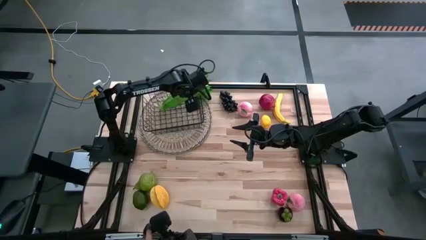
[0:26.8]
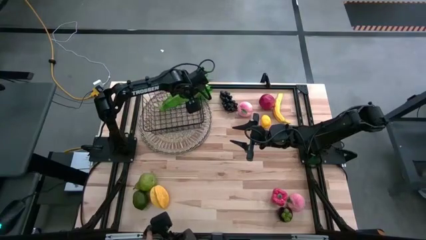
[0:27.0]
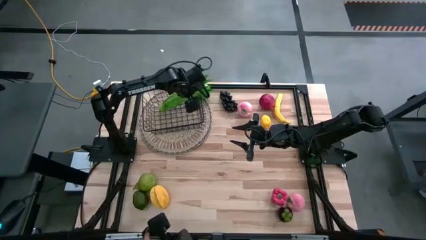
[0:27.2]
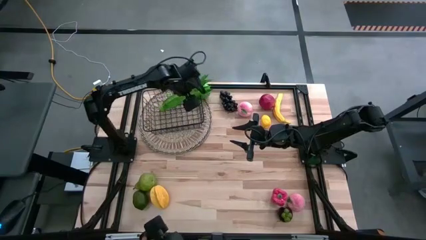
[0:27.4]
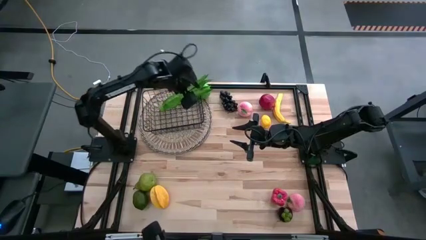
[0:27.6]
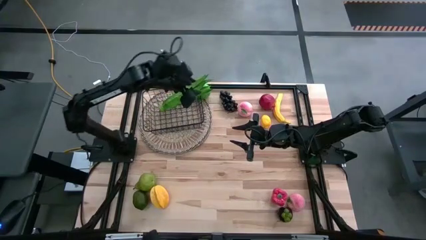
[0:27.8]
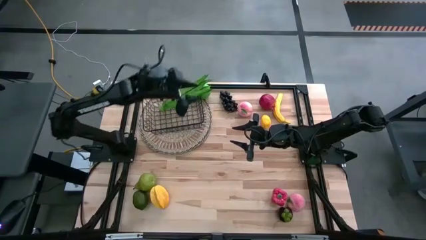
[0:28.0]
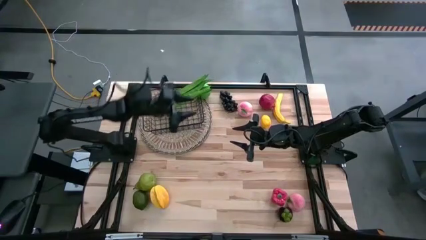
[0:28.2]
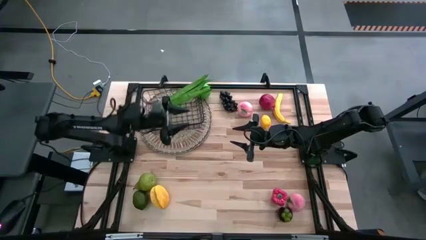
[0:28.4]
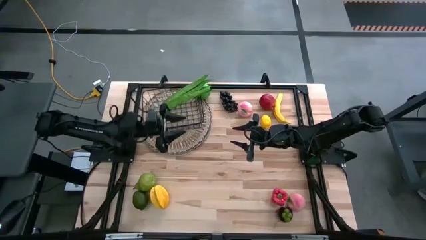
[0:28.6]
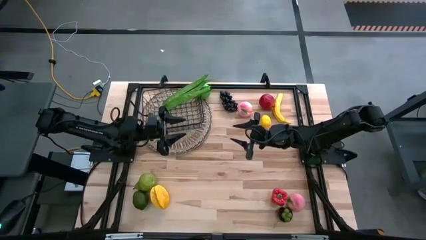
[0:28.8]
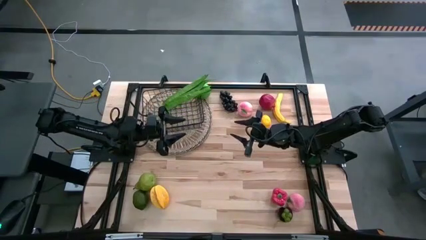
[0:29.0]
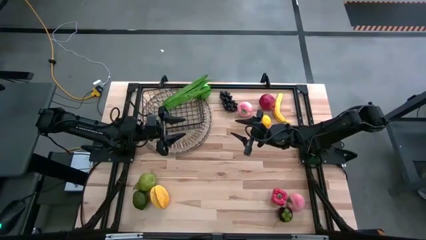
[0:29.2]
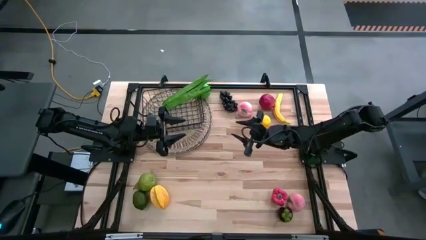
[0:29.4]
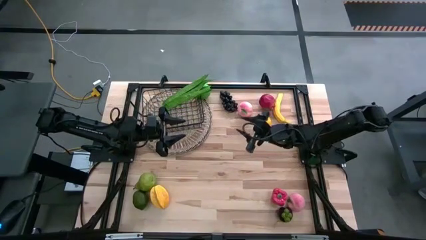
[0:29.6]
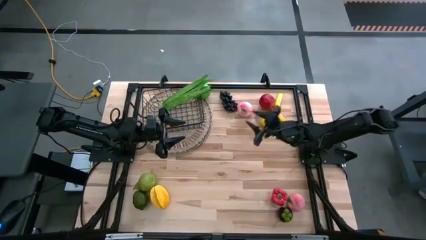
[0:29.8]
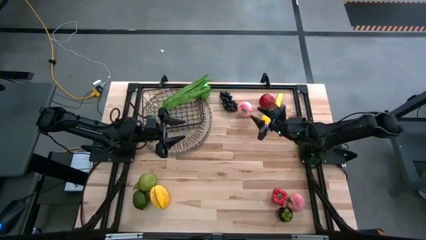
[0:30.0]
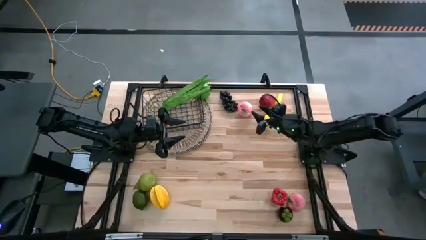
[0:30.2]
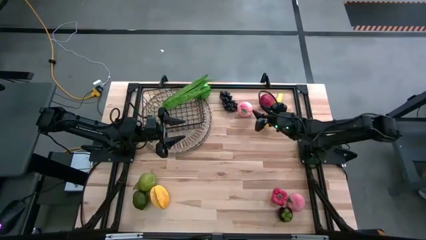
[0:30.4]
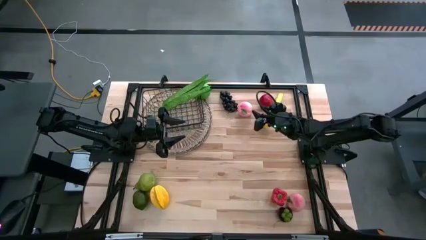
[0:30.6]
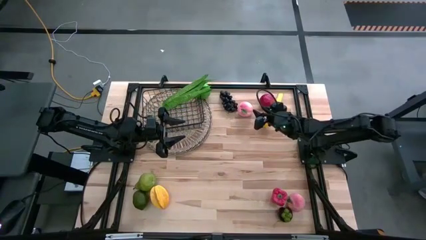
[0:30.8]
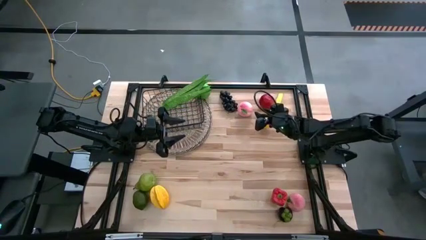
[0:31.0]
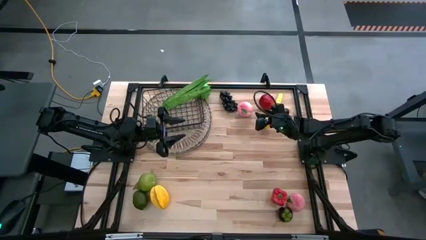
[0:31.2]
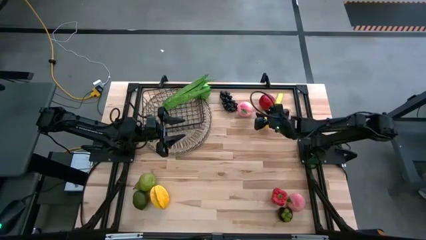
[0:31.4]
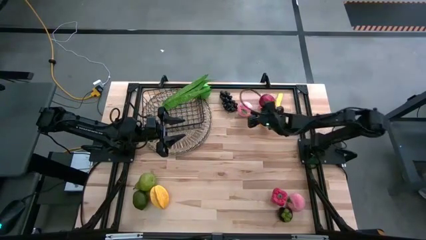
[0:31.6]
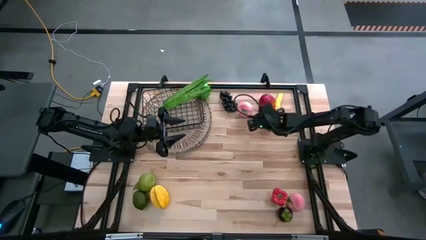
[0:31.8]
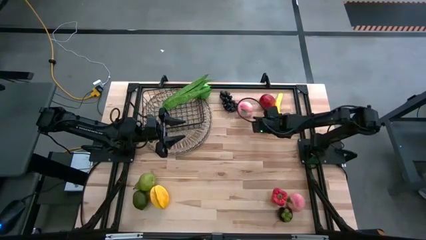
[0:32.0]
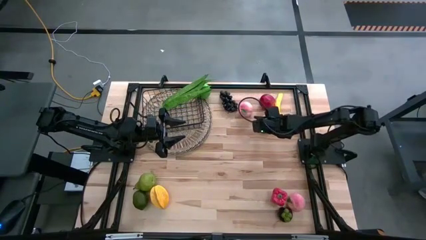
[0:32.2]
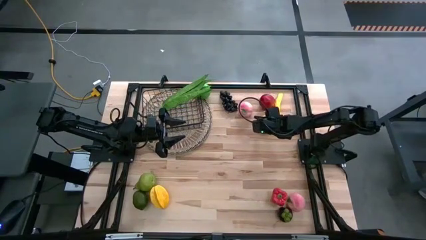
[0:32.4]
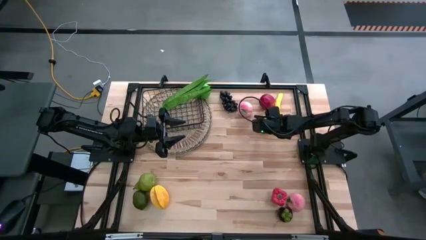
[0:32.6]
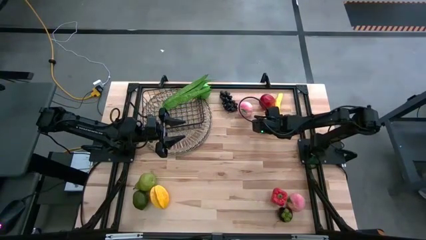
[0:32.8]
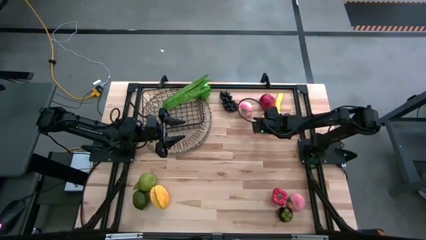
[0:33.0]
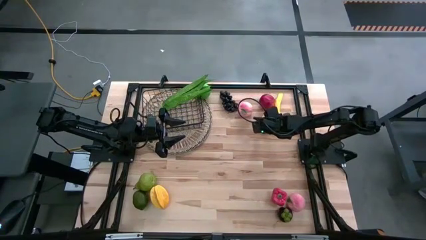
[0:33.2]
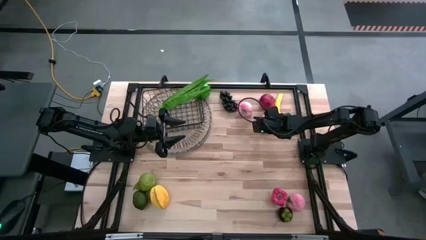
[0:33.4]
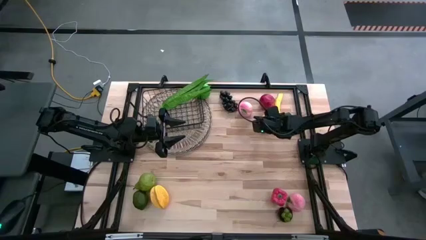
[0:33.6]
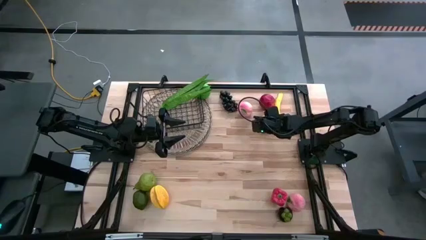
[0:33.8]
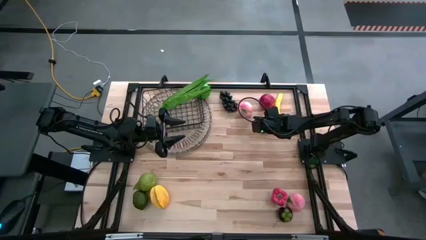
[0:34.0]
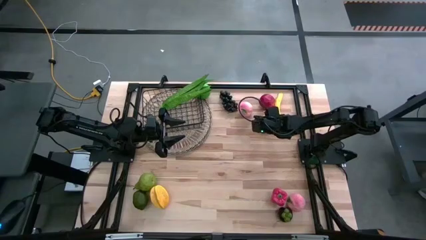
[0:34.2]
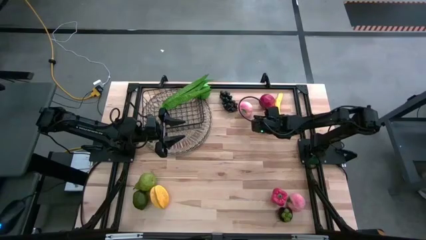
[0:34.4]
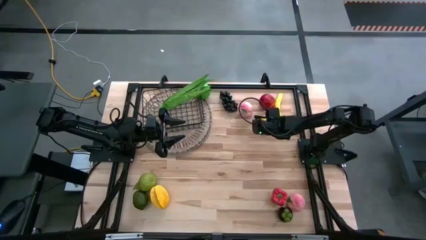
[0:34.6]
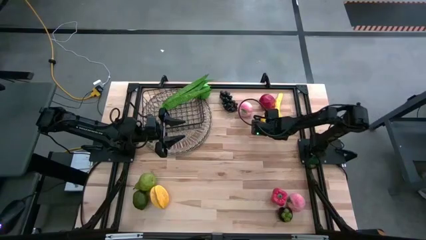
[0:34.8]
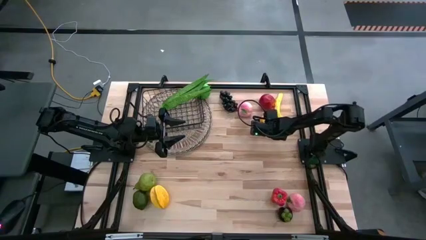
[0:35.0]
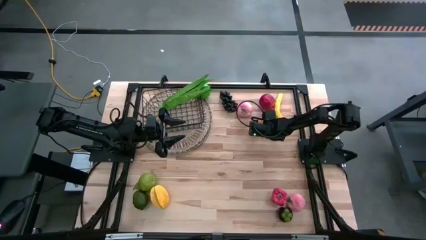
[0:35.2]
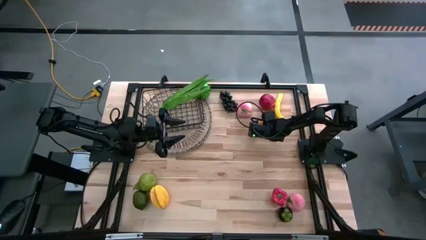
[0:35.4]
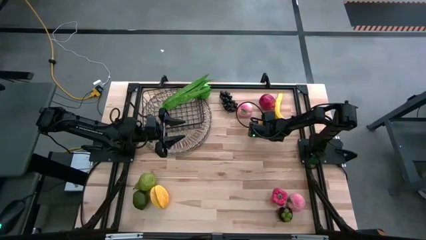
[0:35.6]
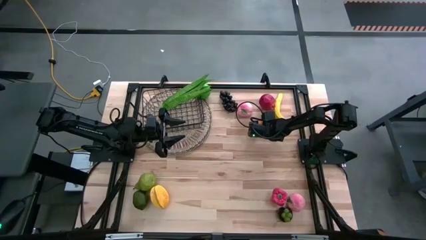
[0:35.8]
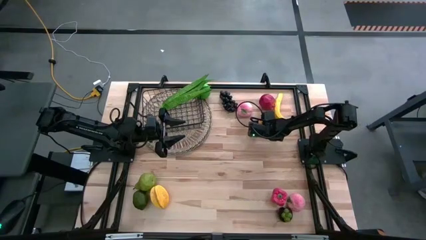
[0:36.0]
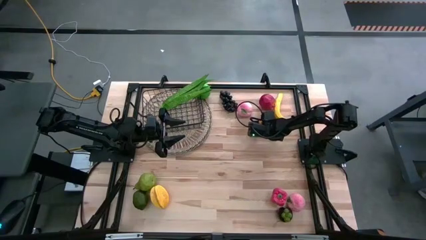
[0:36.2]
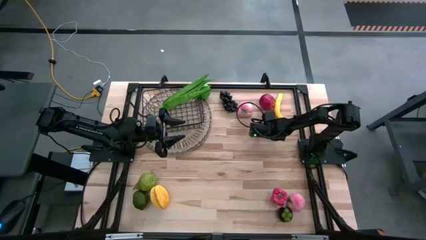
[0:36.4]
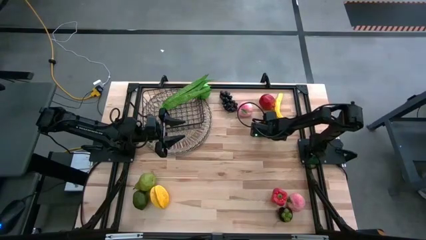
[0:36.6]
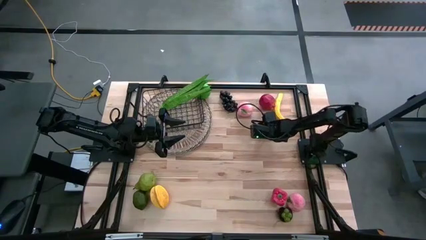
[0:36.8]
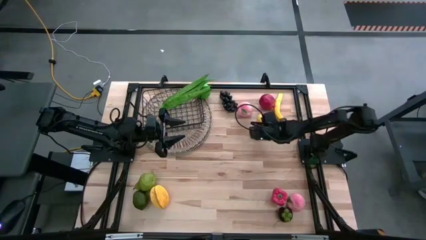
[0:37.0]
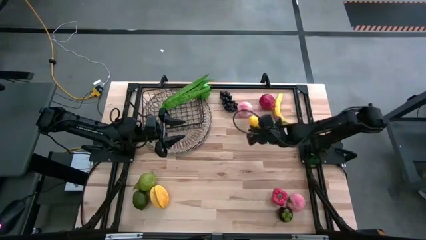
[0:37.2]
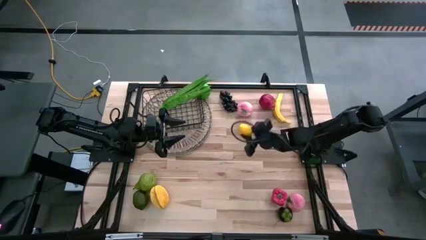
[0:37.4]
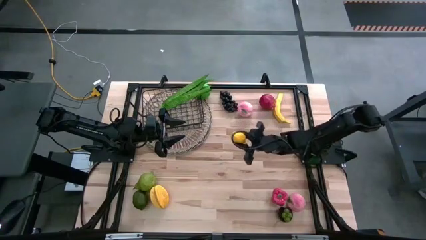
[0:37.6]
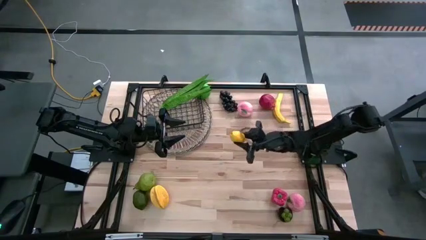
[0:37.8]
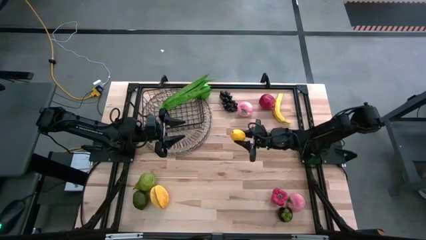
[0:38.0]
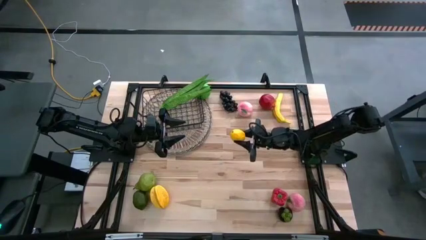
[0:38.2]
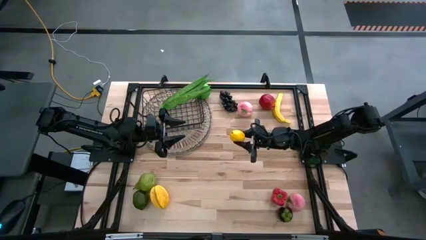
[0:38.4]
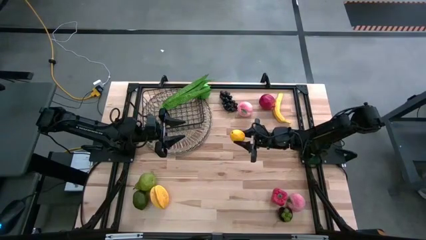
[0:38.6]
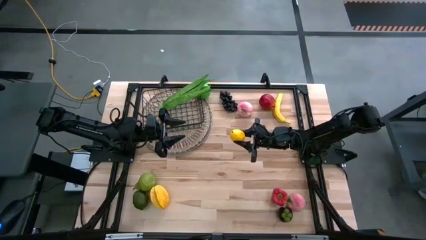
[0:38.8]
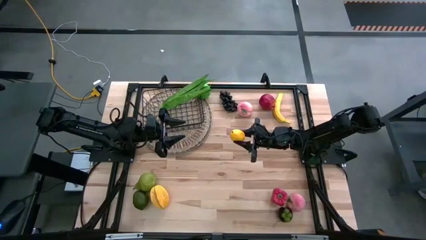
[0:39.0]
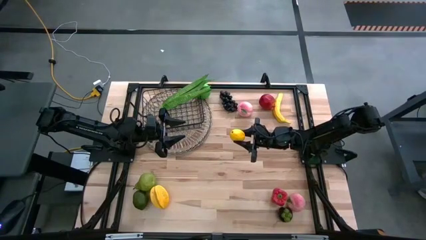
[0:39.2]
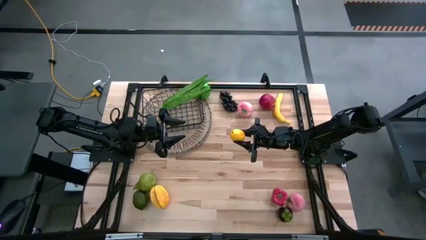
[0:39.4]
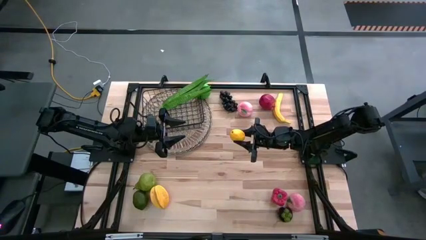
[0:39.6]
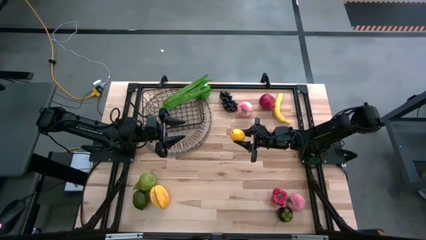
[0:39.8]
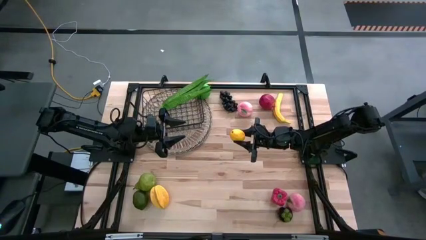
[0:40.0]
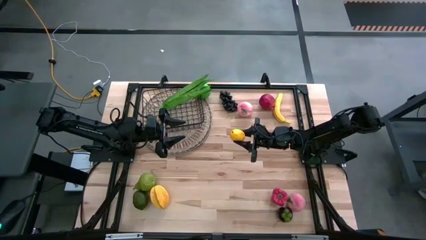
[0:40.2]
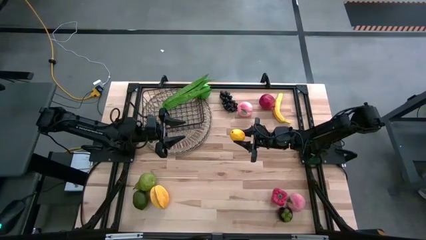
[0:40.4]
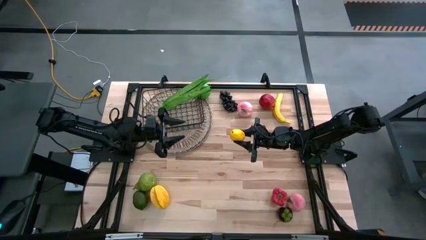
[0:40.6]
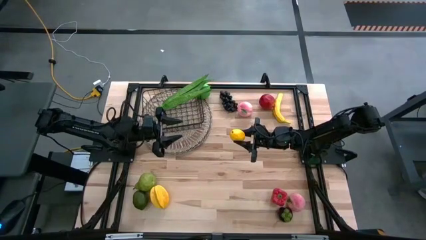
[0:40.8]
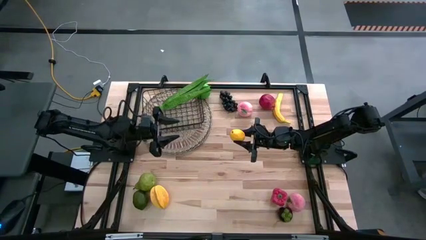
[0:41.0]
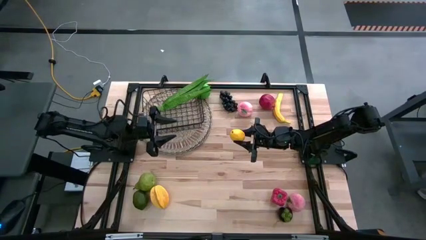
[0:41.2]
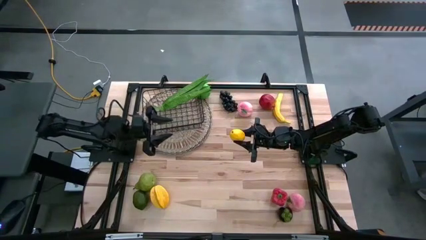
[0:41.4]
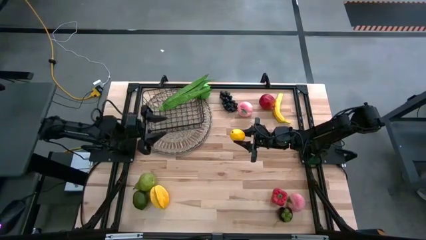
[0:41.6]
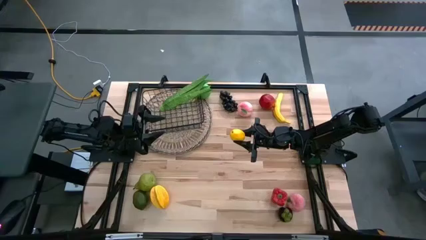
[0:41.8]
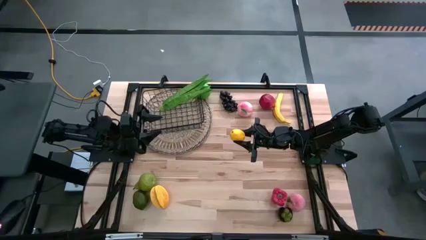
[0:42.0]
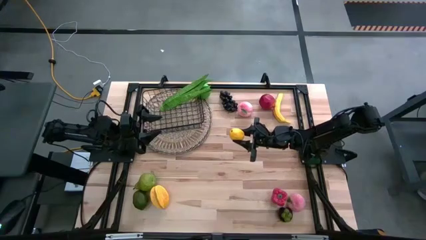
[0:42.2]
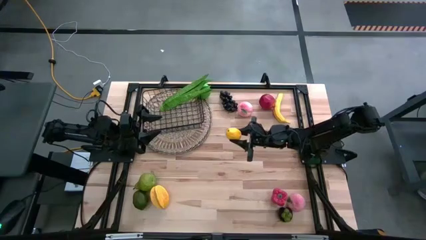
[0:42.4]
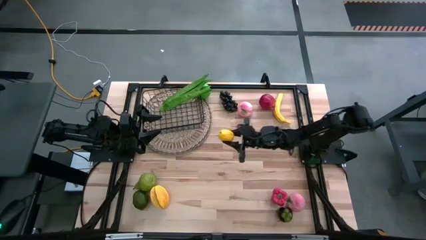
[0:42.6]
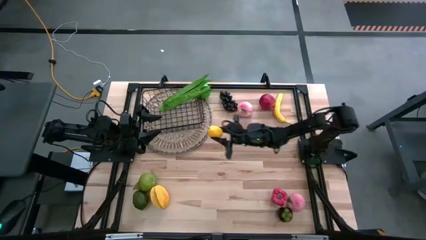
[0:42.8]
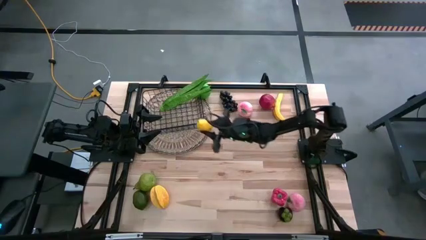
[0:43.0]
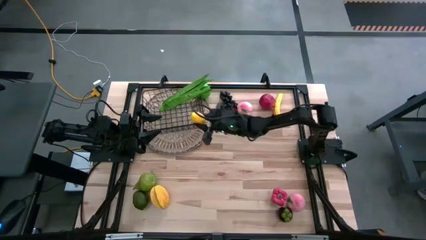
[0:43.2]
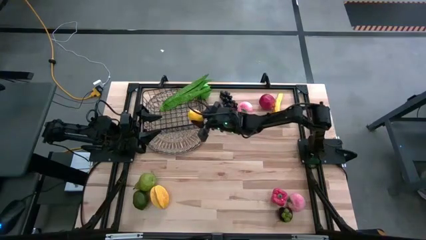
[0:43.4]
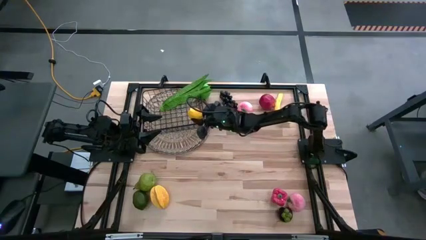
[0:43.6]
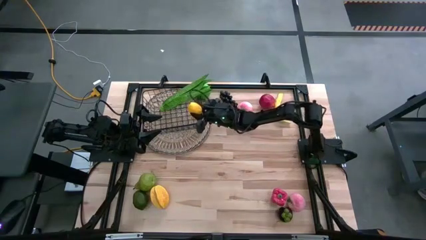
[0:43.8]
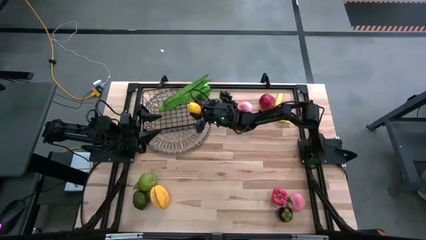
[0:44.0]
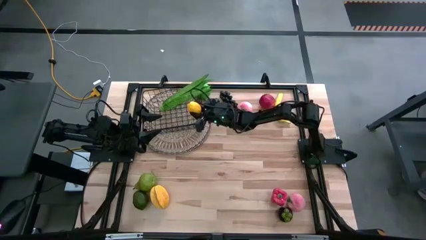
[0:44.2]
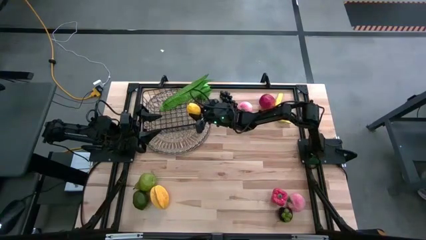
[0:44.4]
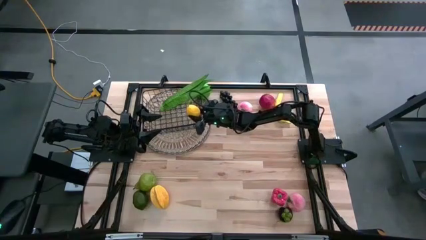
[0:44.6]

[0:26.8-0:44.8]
Task: Build produce basket
Put the yellow lemon into the wire basket
